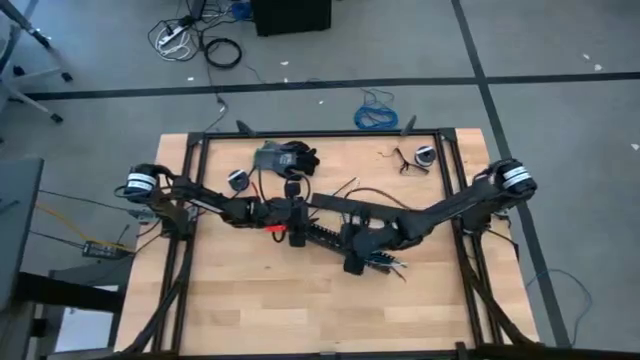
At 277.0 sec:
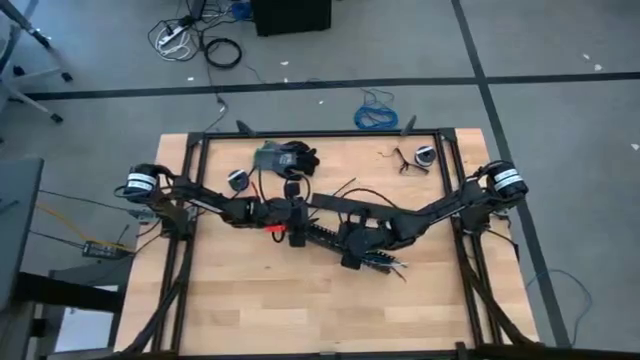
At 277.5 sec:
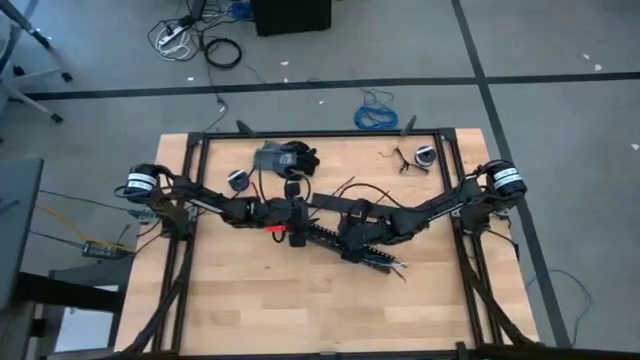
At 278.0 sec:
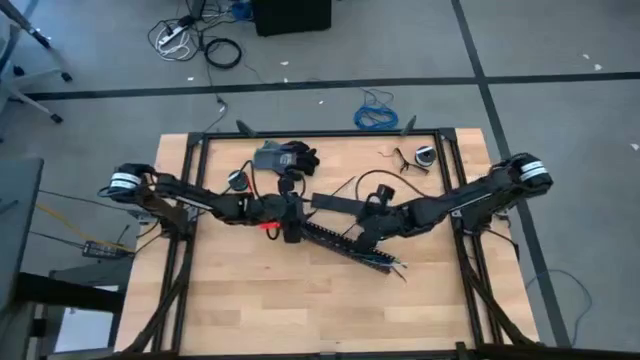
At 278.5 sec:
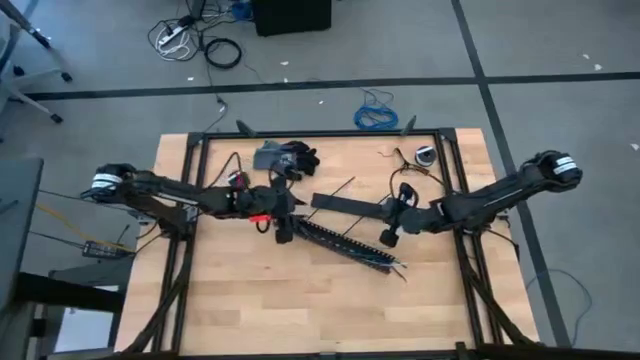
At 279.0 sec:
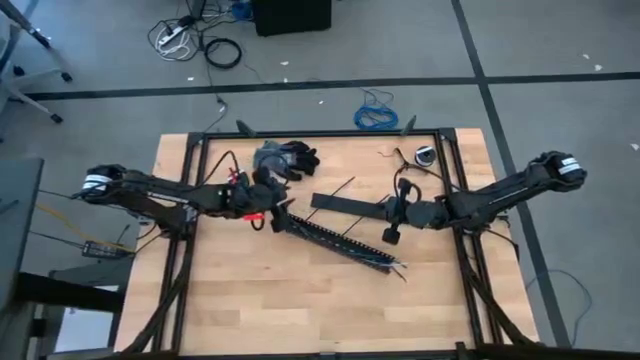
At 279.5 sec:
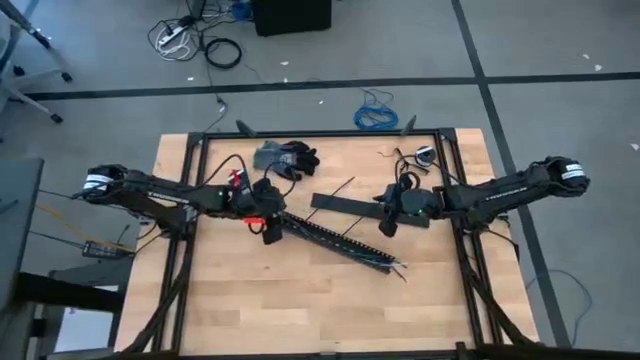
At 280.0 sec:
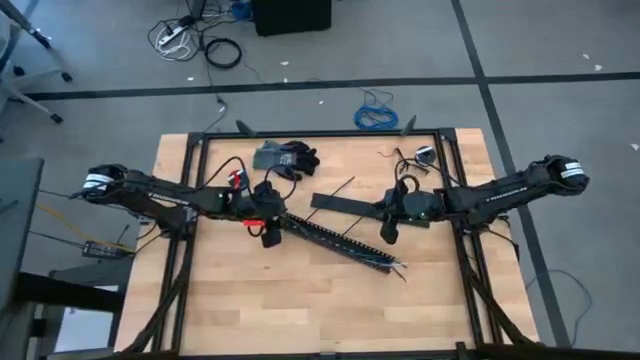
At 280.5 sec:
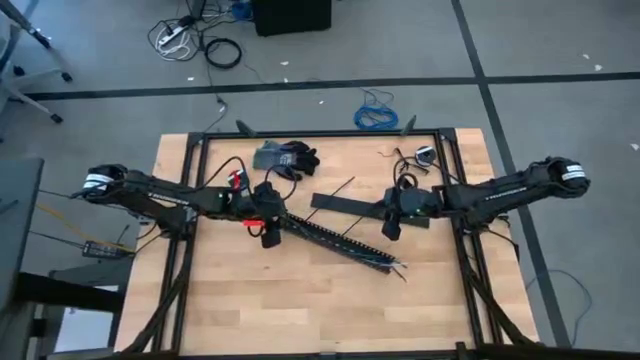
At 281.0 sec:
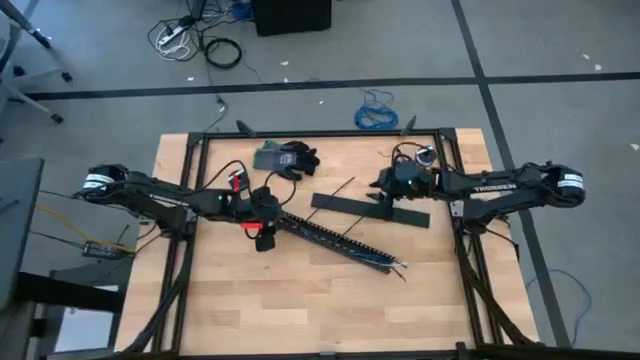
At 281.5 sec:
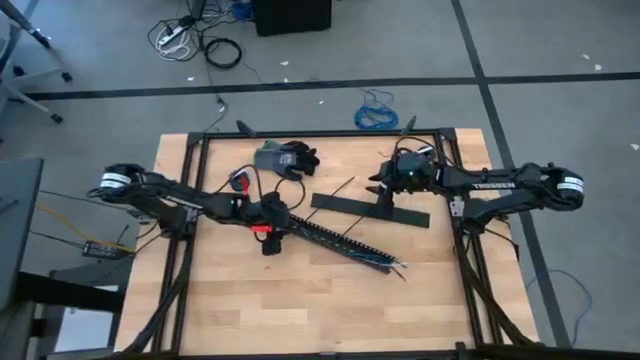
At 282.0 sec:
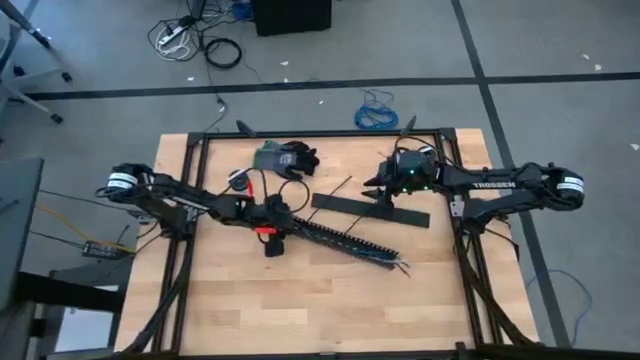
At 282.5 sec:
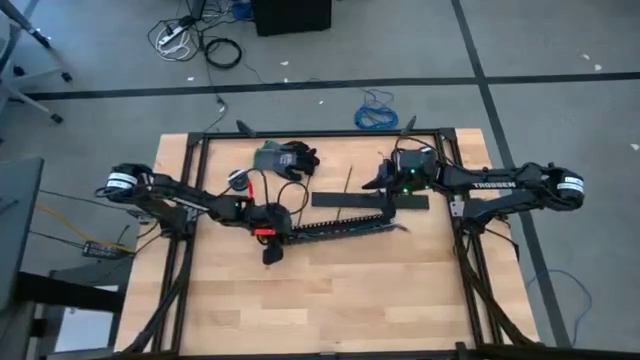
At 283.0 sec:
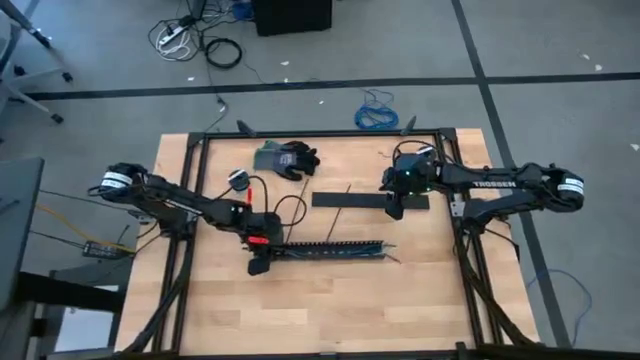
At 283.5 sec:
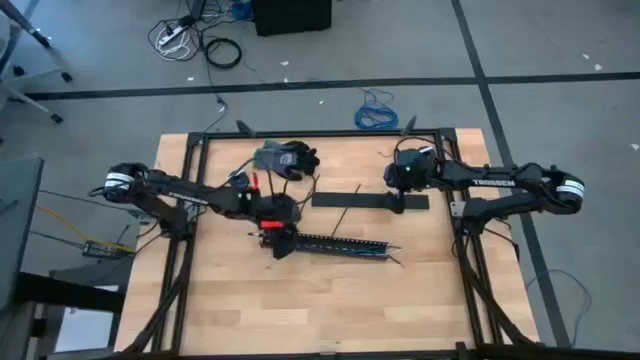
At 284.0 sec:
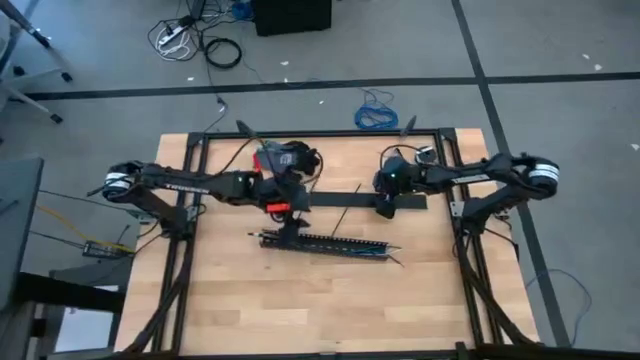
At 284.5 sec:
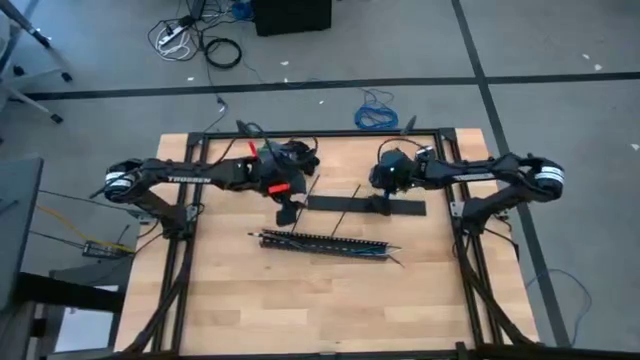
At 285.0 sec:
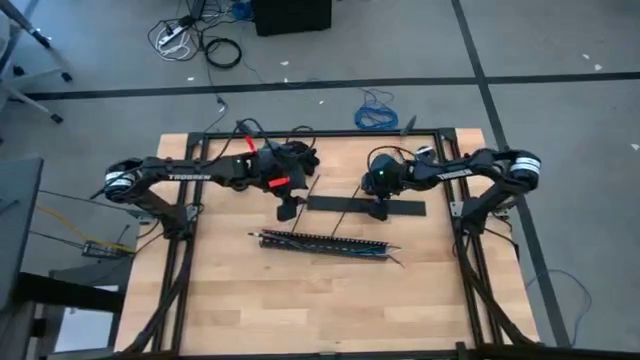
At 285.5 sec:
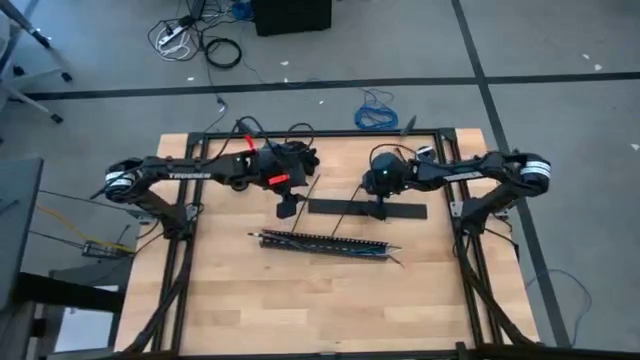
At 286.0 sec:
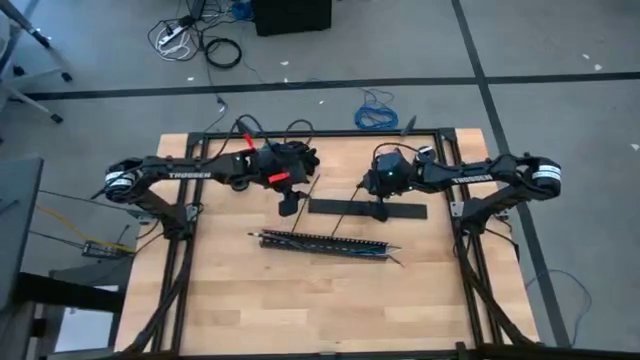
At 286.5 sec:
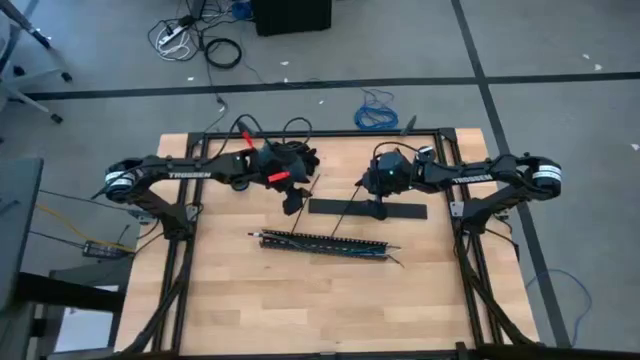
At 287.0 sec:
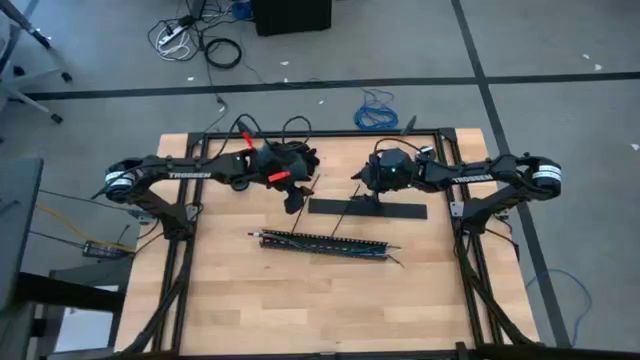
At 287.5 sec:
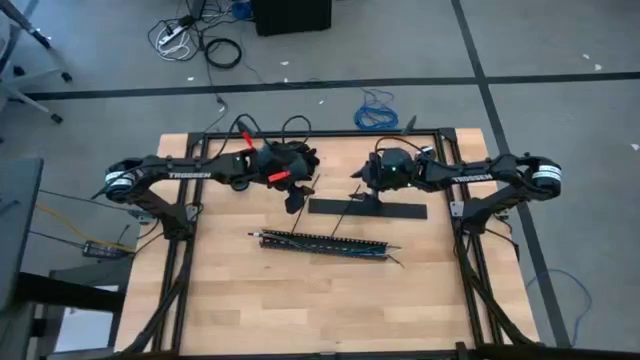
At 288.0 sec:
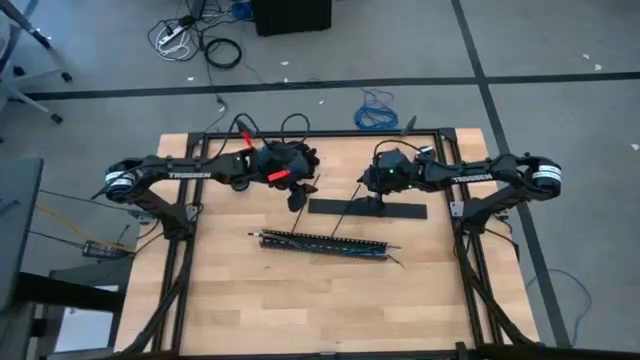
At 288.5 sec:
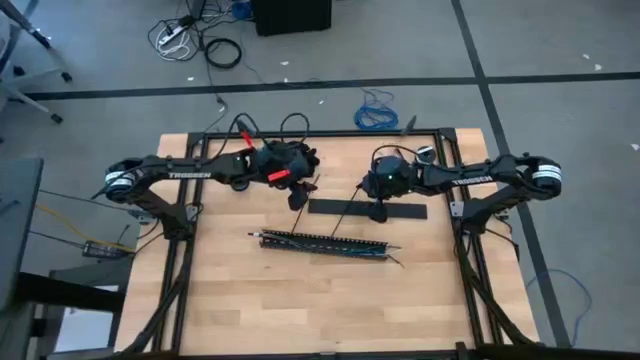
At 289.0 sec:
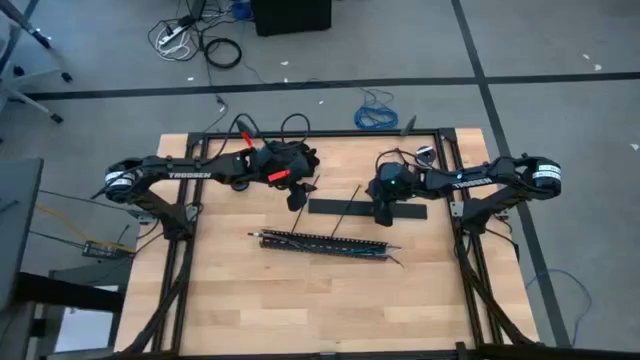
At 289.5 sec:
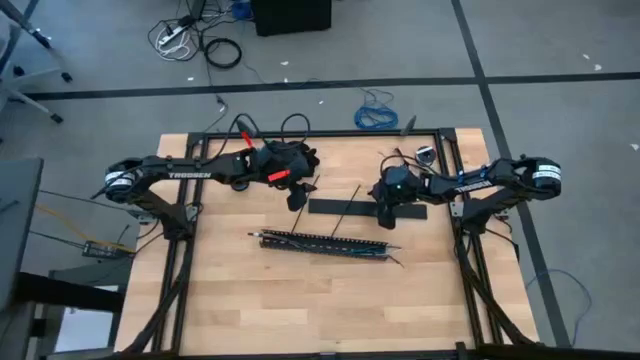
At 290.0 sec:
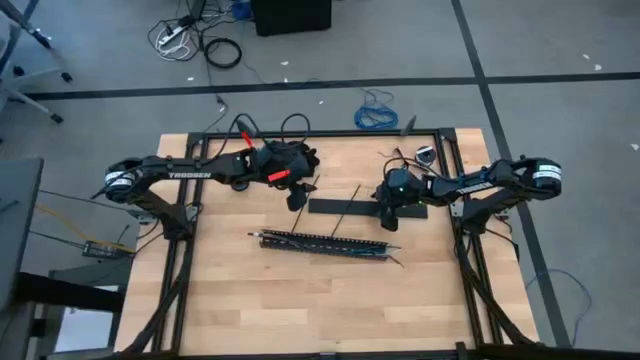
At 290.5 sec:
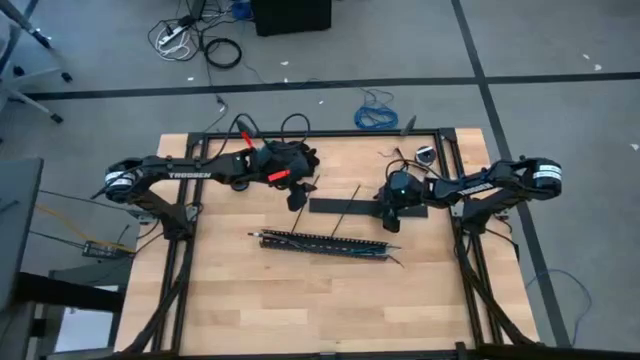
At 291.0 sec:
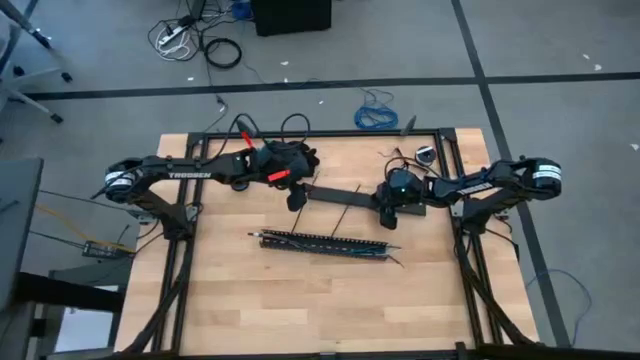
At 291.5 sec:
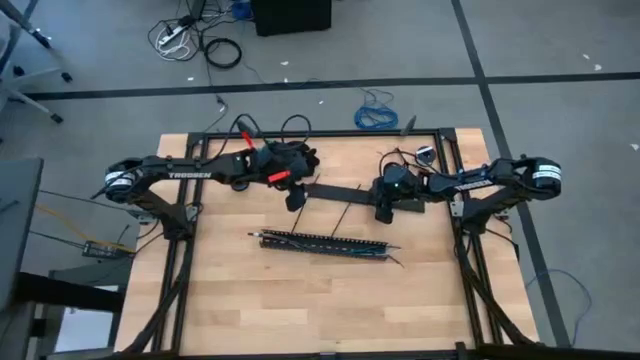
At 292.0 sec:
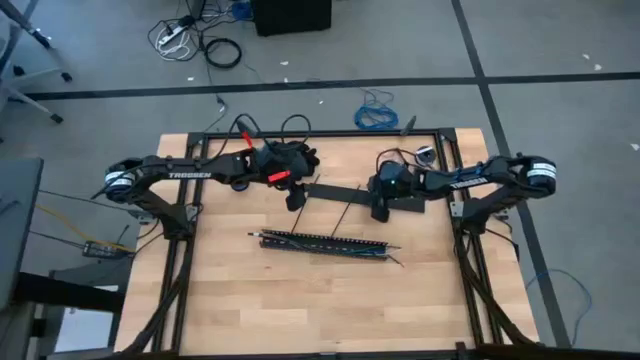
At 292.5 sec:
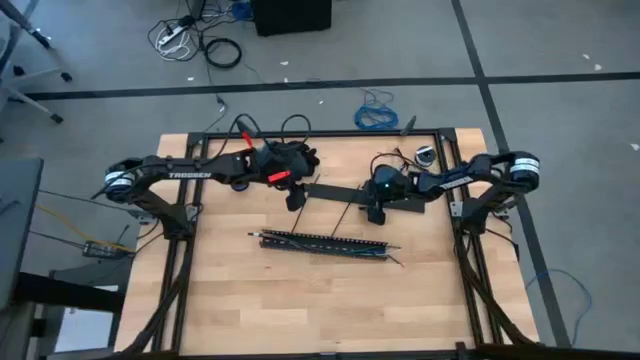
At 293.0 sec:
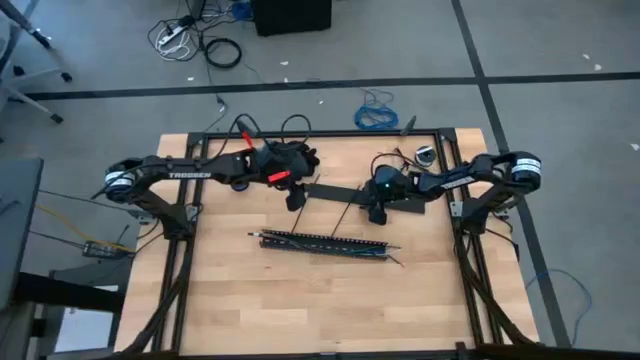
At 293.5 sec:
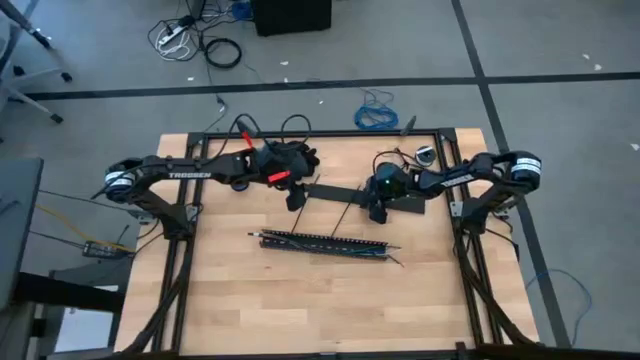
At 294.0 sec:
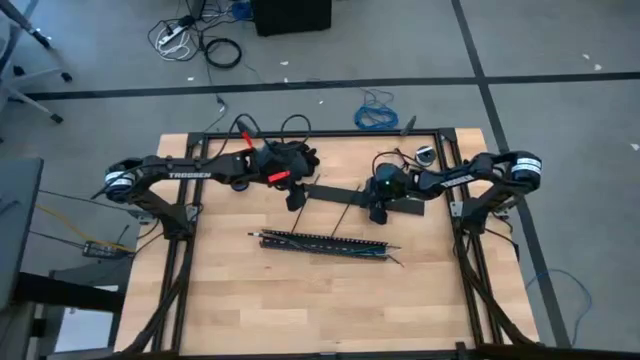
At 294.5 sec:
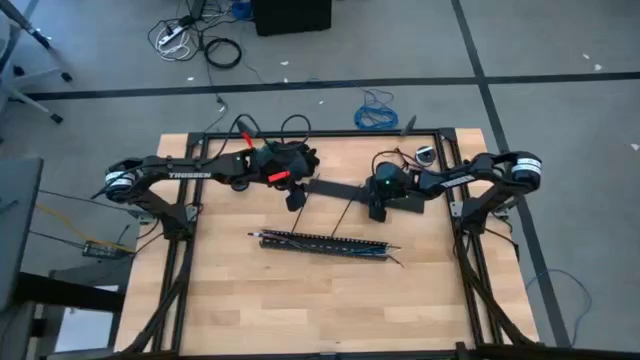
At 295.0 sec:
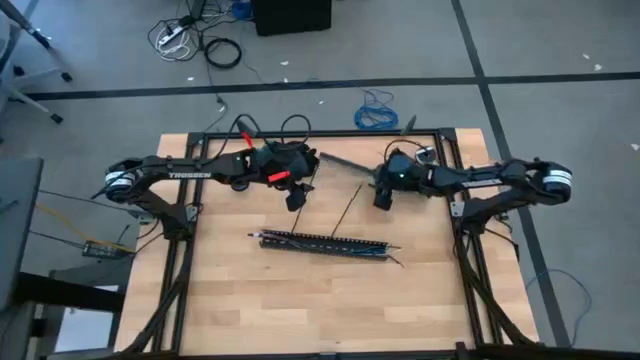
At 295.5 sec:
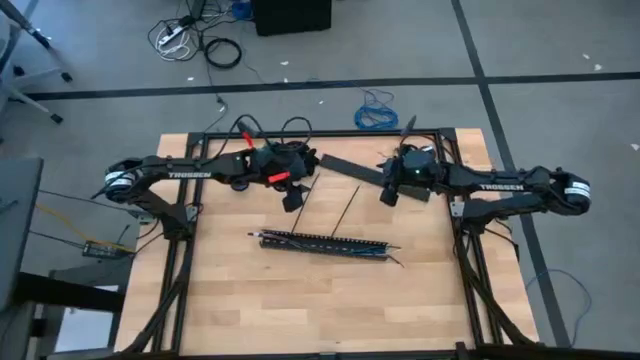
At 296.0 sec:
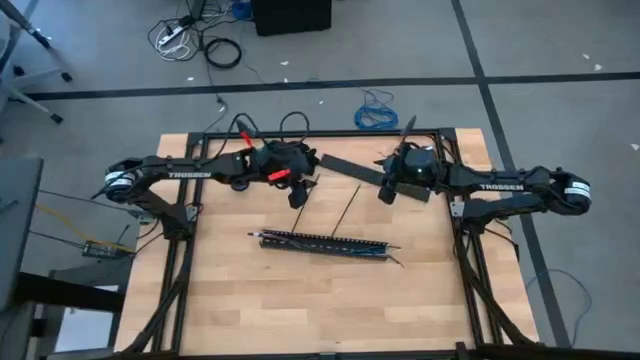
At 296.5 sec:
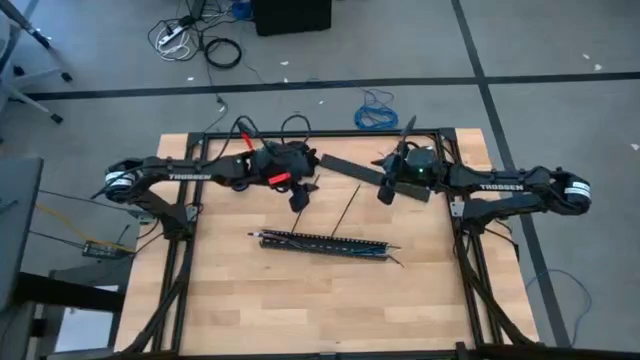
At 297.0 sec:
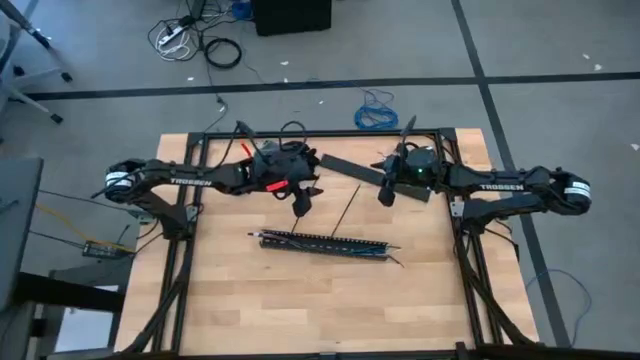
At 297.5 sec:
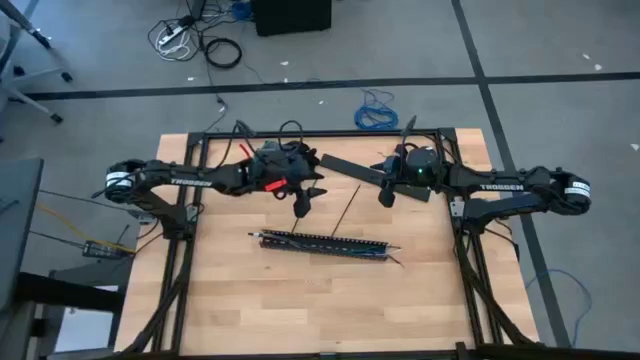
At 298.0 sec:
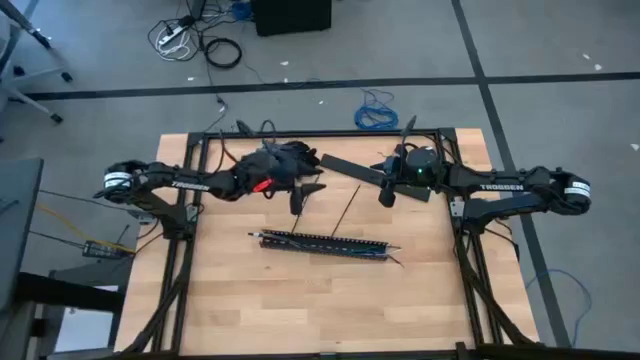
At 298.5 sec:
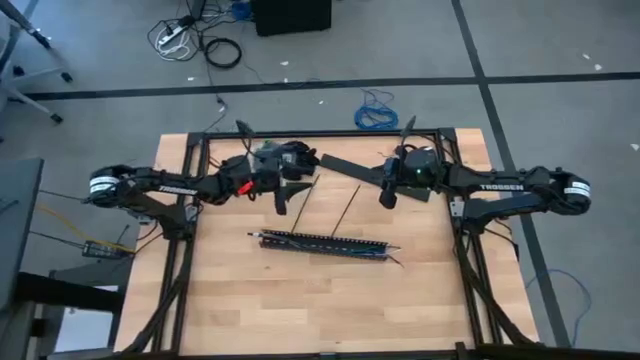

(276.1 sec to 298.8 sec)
Task: Ziptie cables
Close the black cable duct cover
